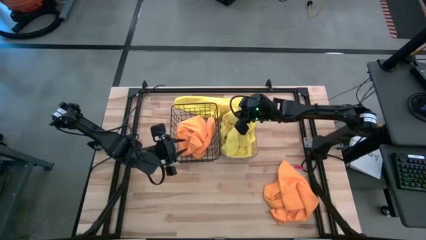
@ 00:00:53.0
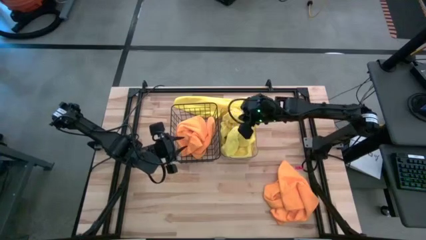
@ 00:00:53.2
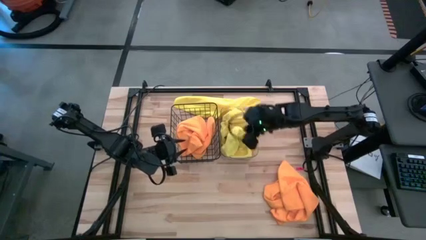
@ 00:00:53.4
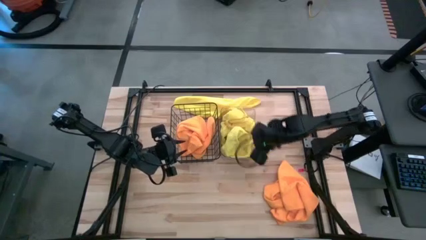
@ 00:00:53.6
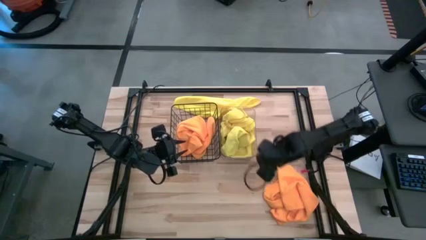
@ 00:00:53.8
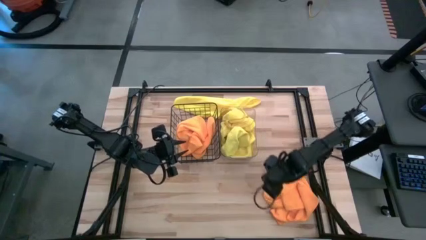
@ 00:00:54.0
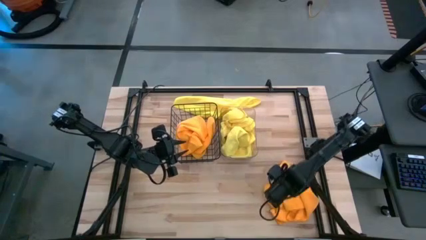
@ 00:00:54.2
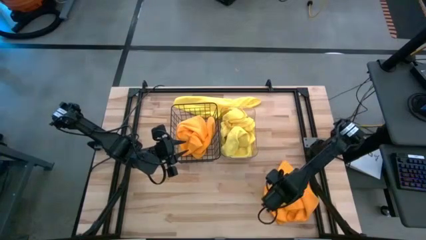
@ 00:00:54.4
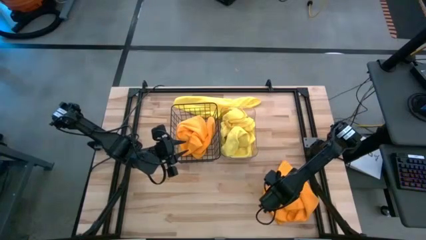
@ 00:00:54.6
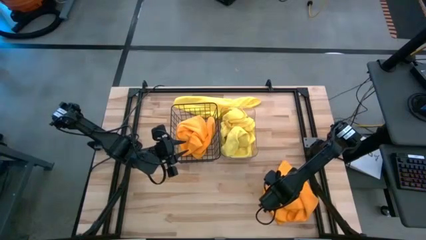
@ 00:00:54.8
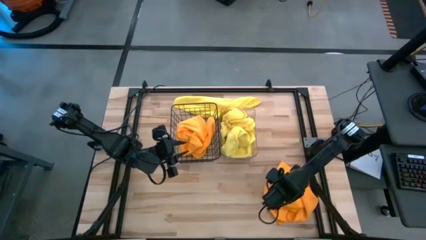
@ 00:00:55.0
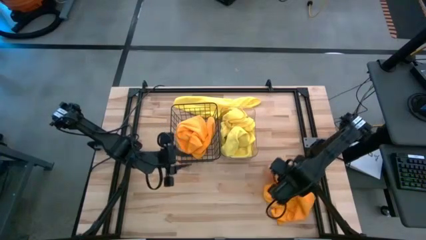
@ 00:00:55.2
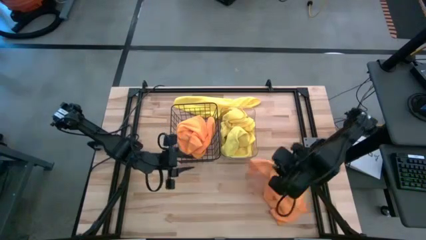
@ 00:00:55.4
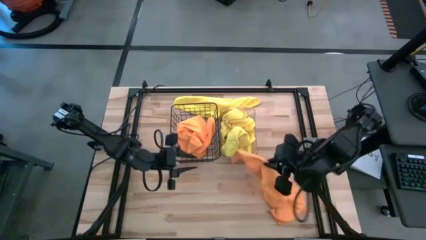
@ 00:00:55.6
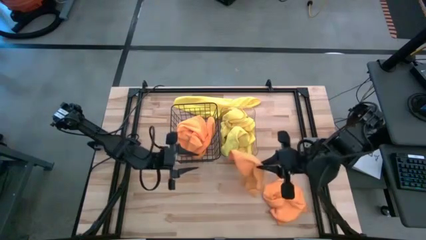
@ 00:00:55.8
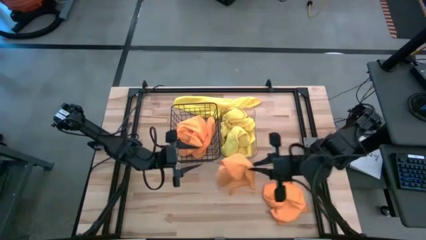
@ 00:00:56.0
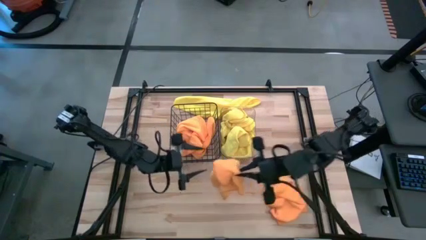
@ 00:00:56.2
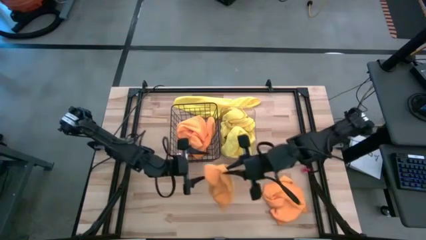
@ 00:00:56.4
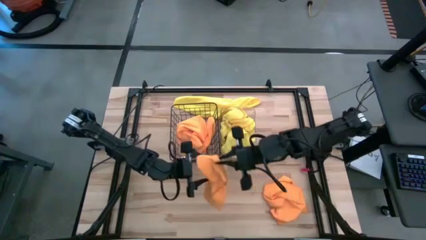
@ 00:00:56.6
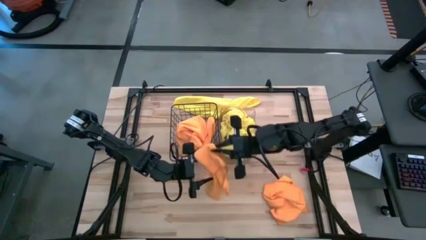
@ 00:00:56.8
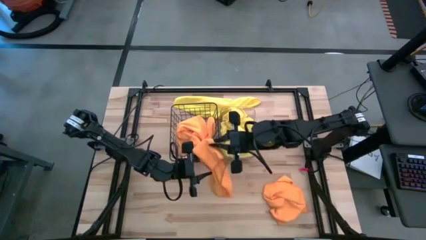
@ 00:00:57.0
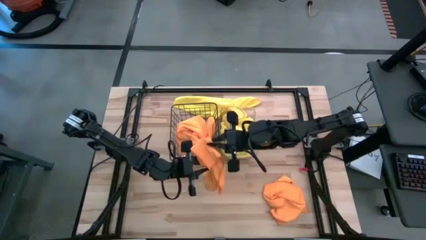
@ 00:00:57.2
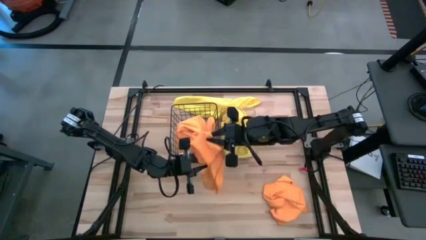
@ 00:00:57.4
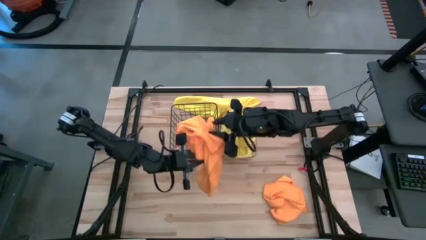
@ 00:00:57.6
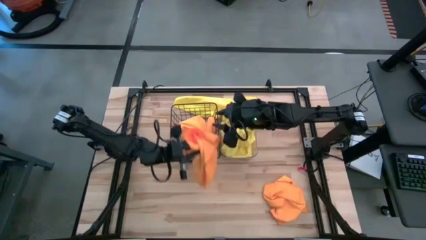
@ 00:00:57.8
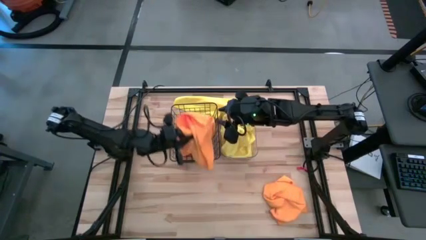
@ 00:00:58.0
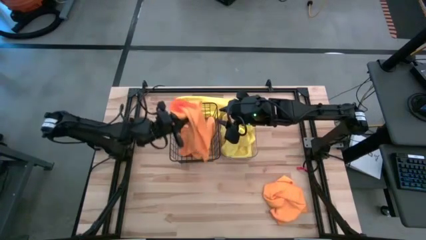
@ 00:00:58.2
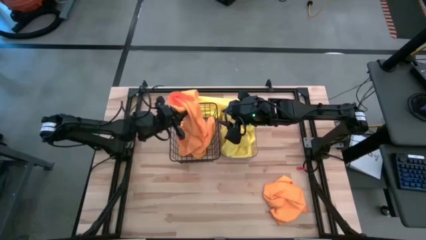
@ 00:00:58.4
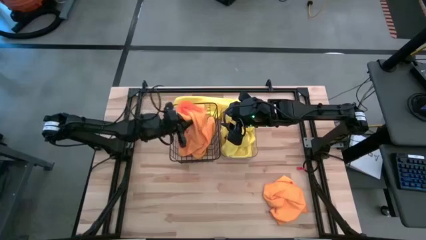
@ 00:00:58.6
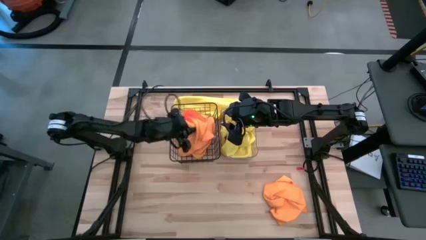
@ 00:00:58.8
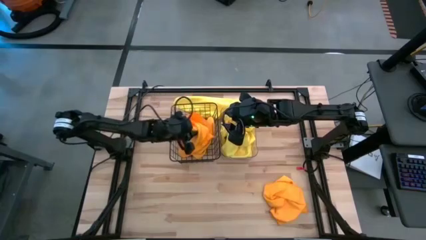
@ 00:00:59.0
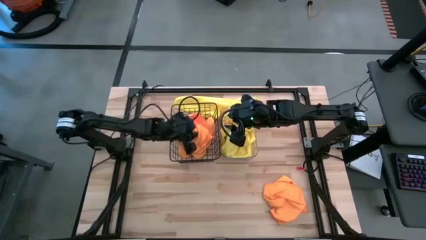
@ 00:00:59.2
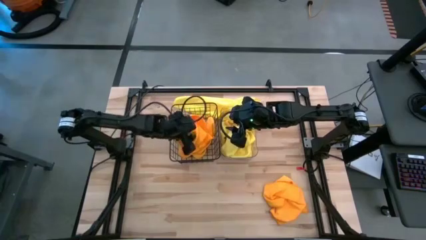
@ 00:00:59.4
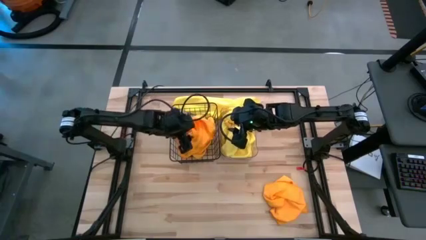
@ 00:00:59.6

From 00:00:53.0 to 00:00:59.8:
Task: Sort microfiber towel by color & place in baskets
Put the orange microfiber towel into the wire basket

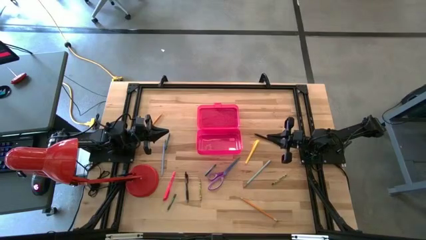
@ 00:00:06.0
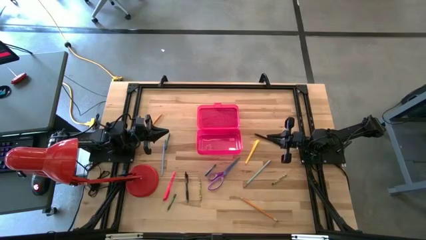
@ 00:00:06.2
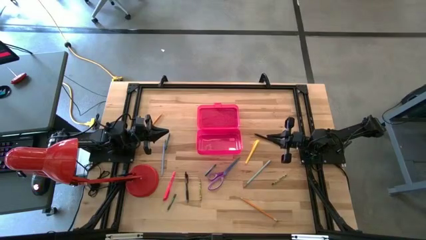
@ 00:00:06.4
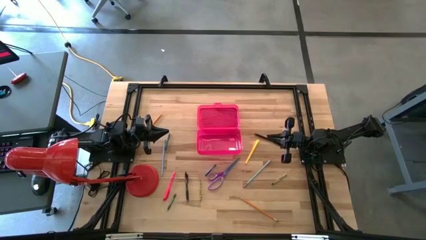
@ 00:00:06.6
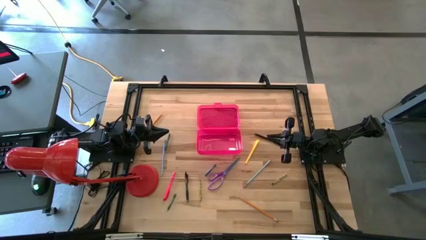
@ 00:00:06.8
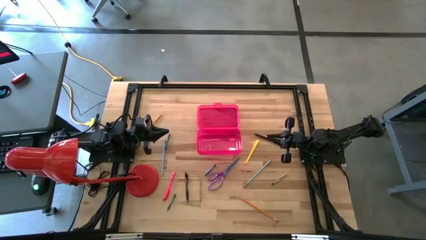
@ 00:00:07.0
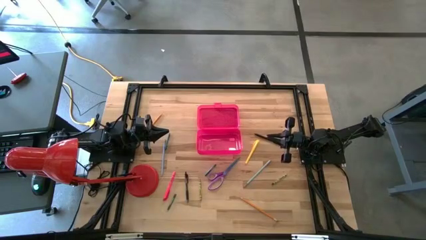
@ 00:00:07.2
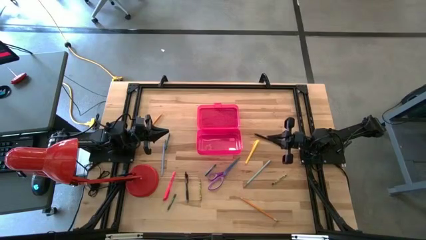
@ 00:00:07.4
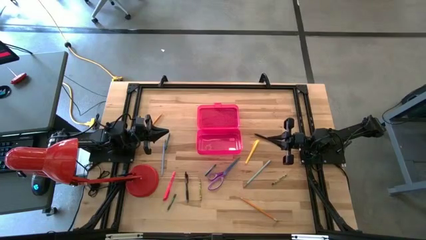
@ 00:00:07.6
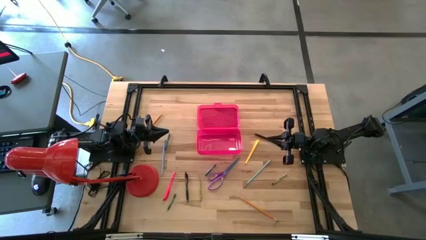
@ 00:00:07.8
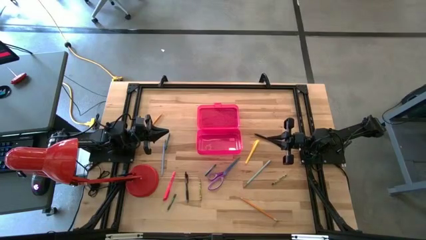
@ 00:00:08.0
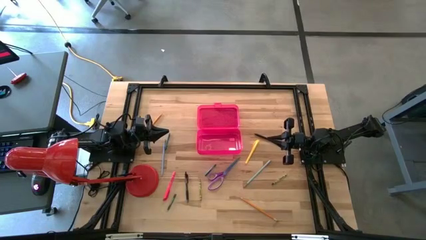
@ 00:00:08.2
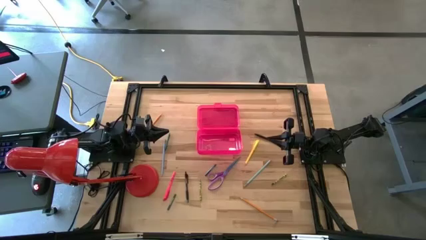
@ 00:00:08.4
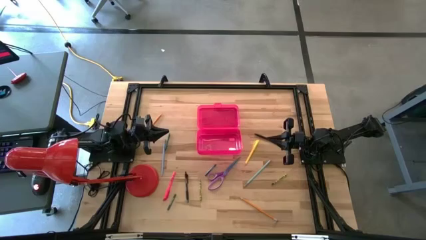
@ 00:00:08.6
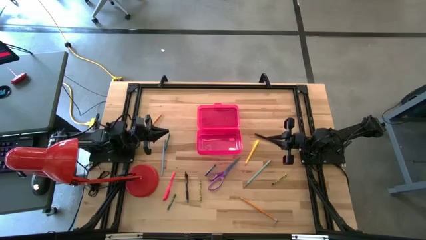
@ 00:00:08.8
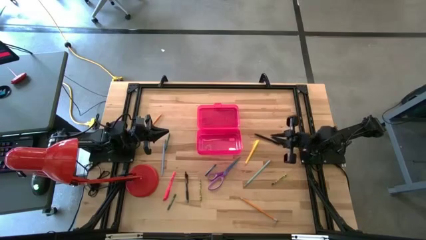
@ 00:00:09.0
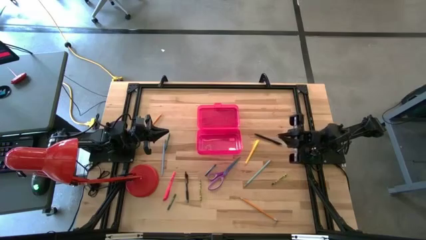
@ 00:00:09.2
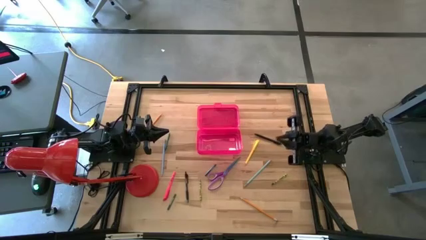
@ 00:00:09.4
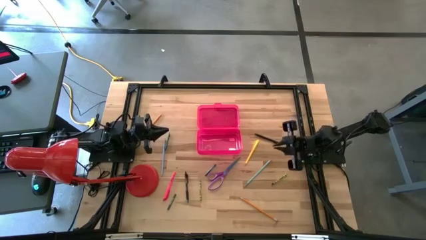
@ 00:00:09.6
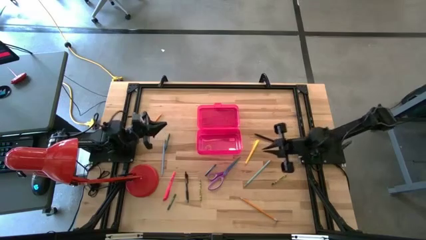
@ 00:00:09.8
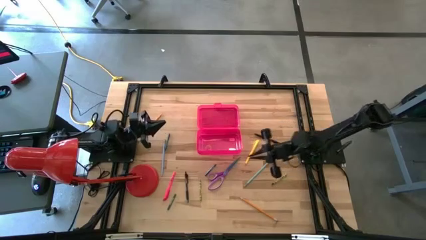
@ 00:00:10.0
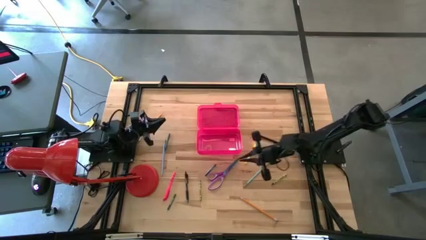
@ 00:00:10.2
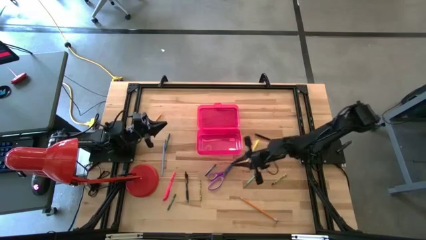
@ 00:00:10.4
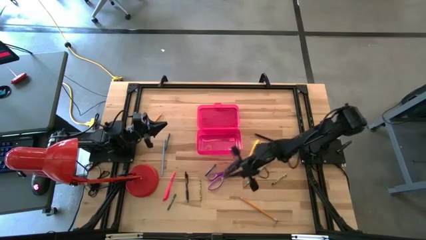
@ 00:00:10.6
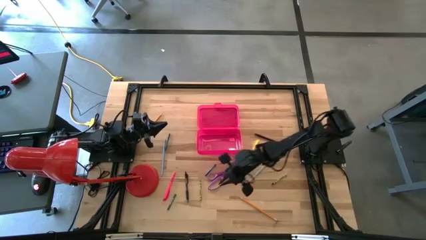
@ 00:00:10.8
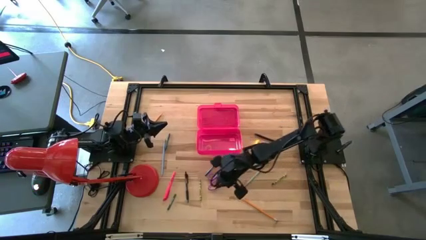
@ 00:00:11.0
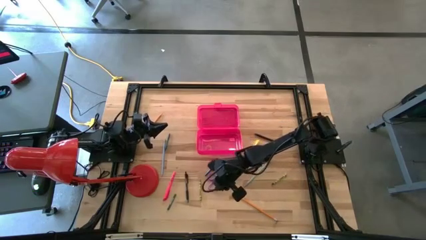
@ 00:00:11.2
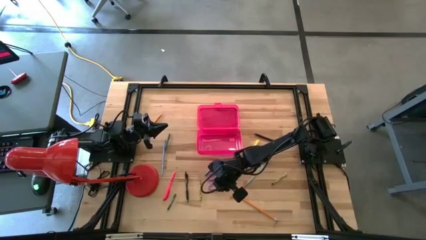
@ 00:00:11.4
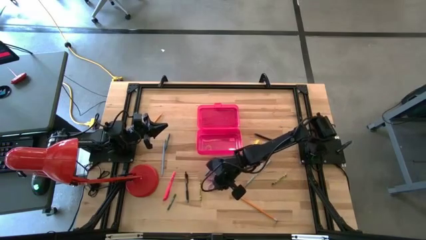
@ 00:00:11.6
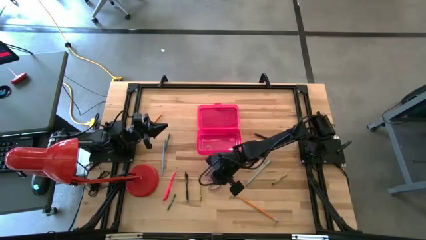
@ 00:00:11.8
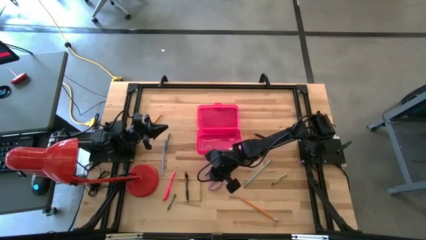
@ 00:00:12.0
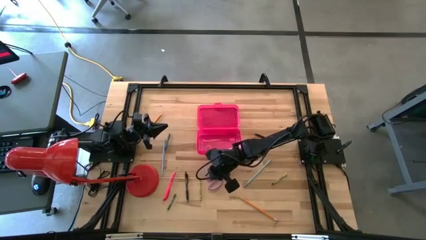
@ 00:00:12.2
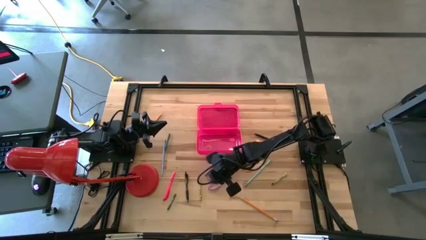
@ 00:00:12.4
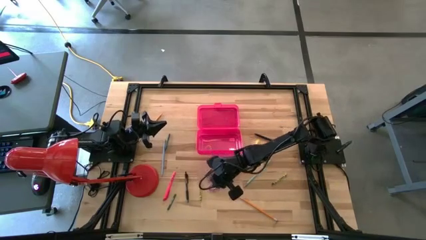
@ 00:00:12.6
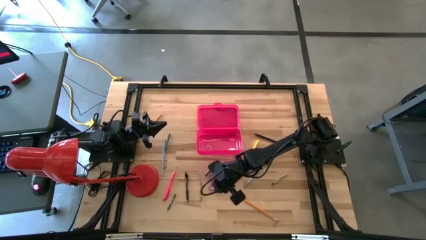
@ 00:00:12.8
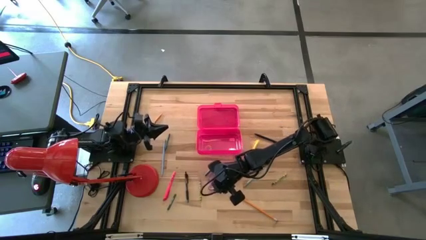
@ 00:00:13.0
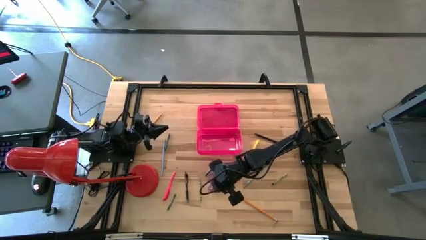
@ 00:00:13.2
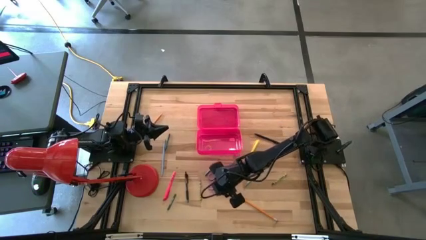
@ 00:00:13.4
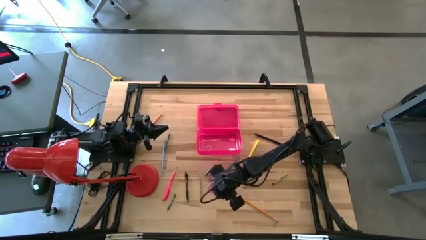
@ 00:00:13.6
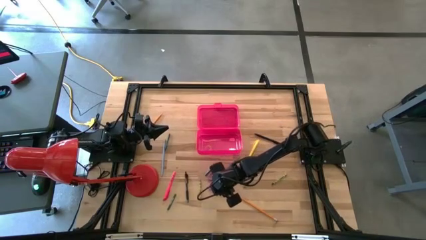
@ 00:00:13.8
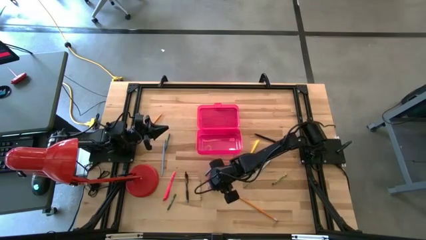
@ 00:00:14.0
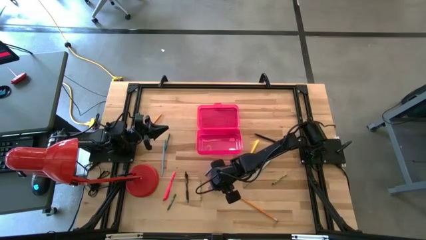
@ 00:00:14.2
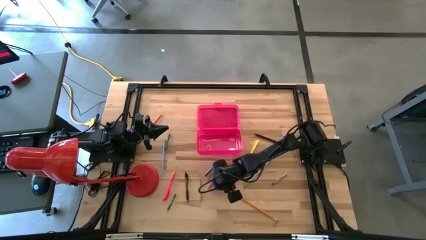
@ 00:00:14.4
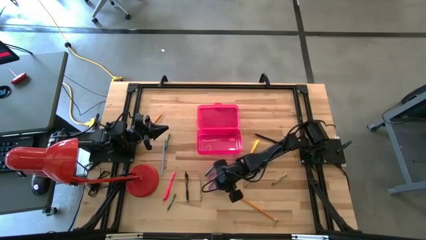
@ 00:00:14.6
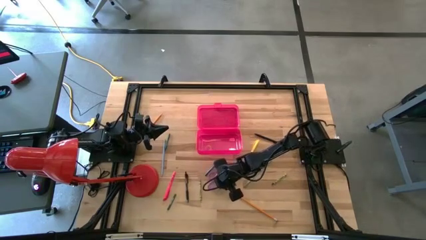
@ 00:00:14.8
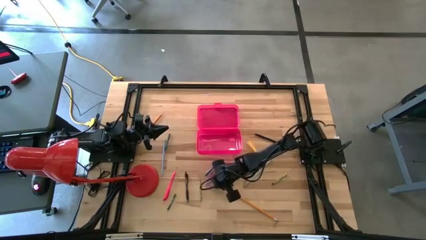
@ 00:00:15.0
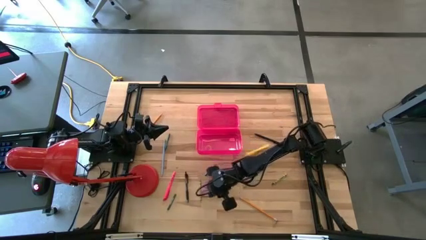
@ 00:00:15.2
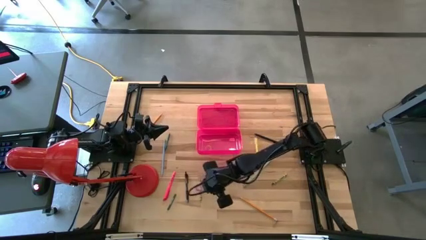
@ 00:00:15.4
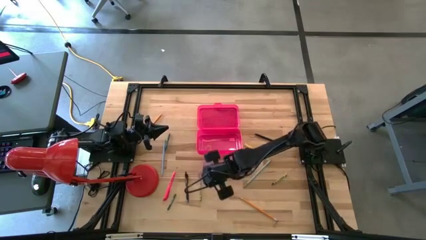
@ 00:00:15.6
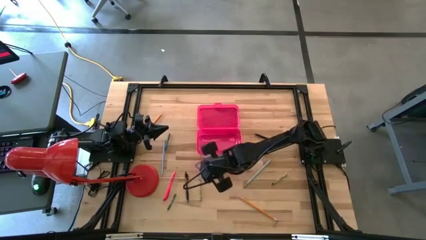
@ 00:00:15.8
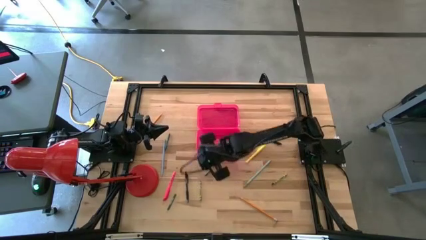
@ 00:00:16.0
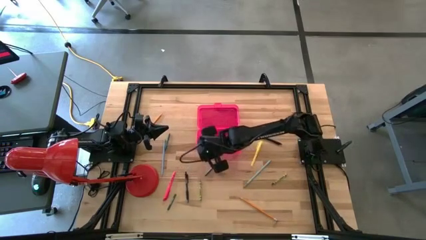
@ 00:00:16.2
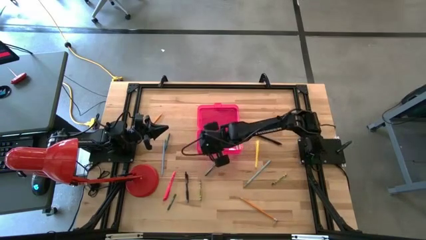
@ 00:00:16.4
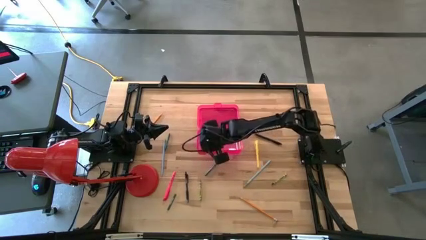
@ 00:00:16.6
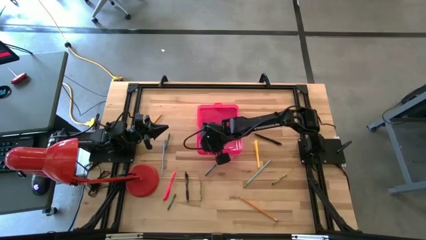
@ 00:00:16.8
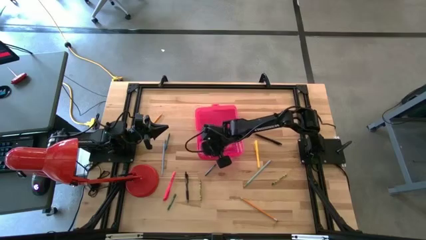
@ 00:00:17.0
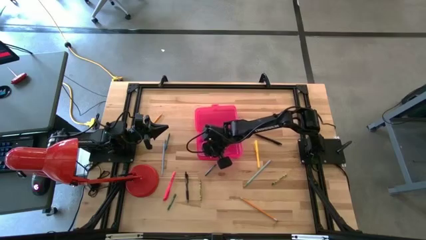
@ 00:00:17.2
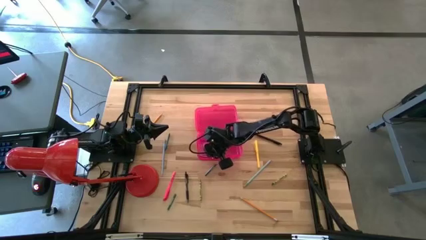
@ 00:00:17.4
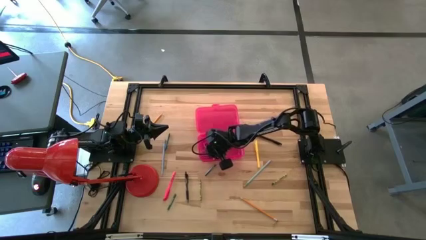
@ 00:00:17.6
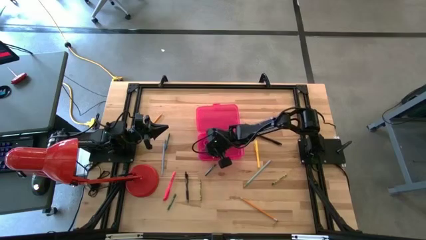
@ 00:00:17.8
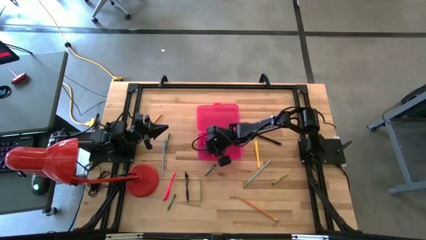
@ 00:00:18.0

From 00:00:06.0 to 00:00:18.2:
Task: Pick & place school supplies into a supply box
Put the purple scissors into the pink supply box
